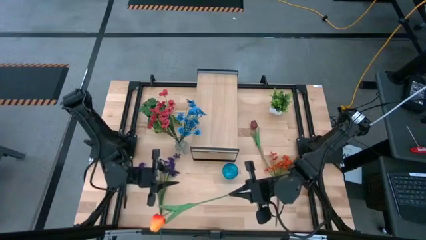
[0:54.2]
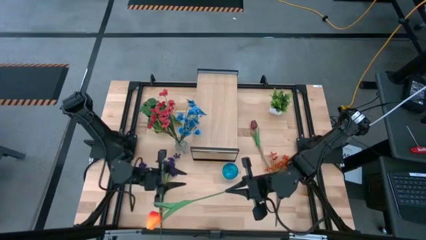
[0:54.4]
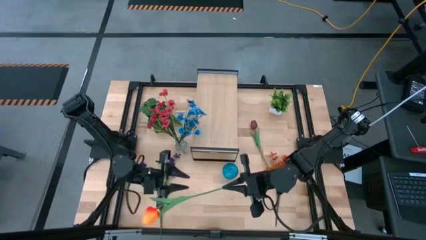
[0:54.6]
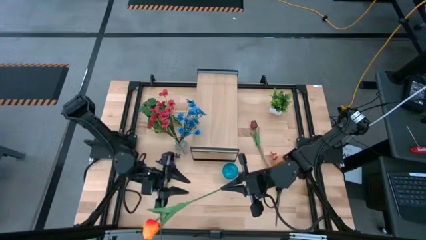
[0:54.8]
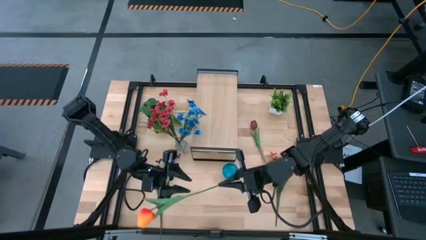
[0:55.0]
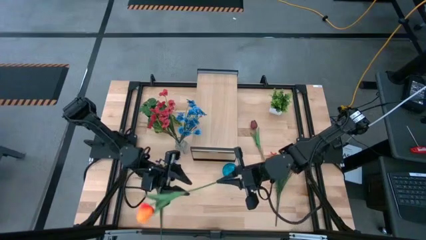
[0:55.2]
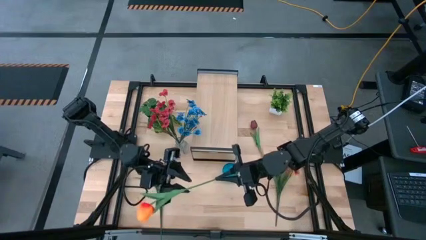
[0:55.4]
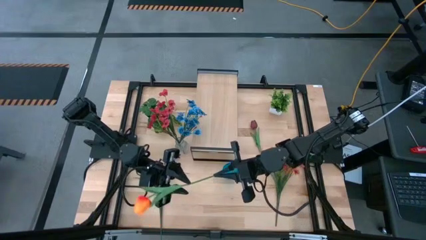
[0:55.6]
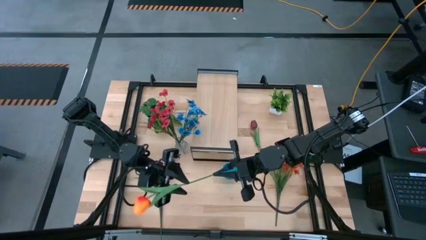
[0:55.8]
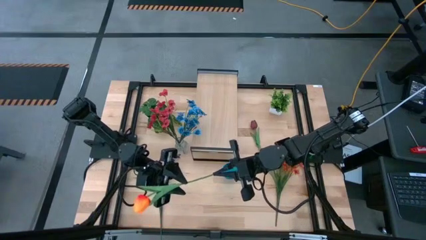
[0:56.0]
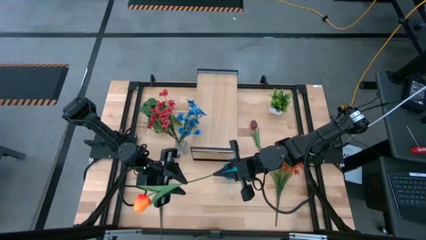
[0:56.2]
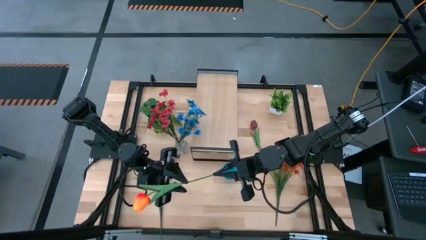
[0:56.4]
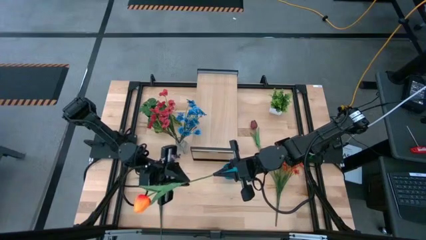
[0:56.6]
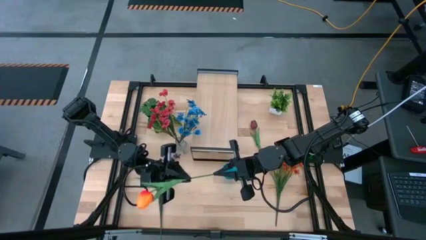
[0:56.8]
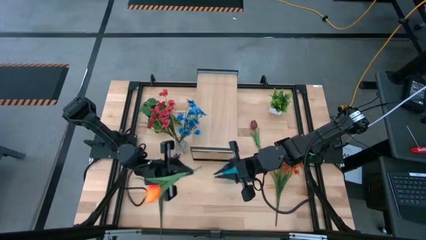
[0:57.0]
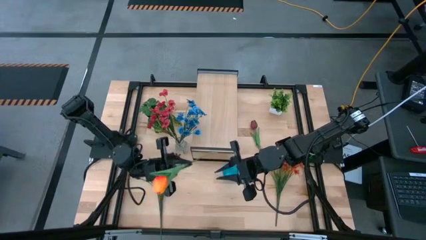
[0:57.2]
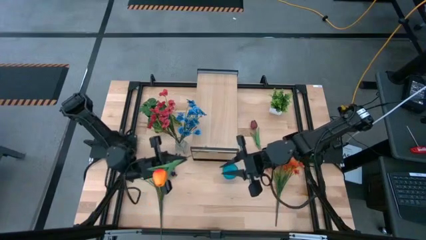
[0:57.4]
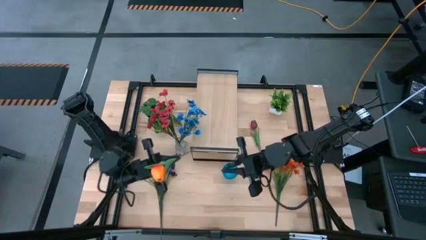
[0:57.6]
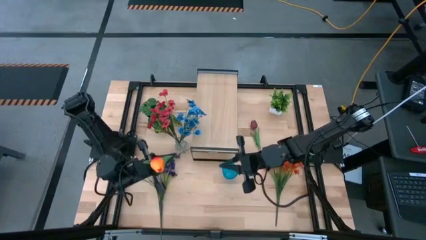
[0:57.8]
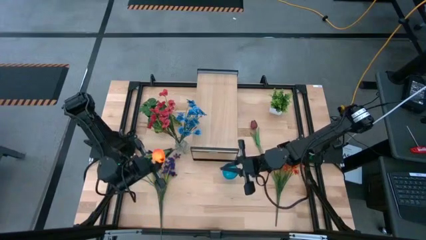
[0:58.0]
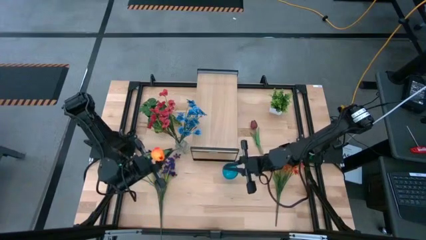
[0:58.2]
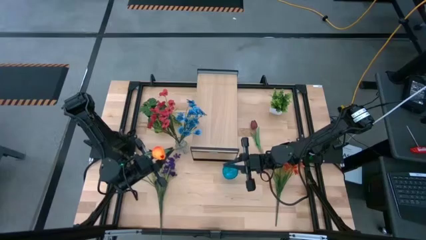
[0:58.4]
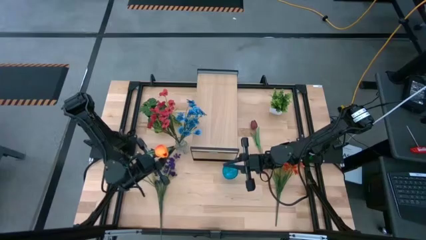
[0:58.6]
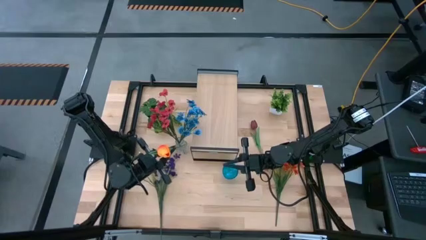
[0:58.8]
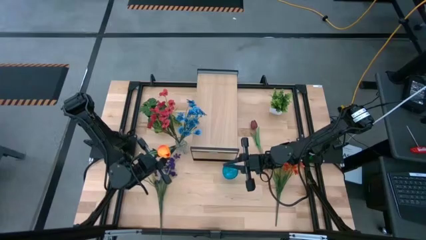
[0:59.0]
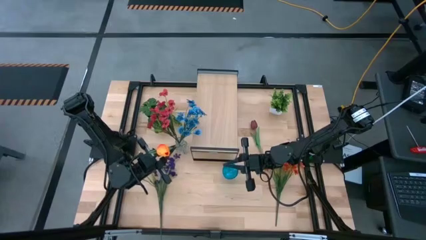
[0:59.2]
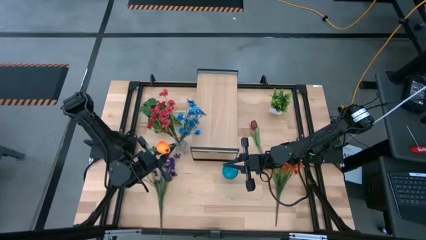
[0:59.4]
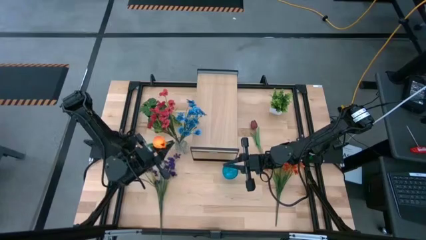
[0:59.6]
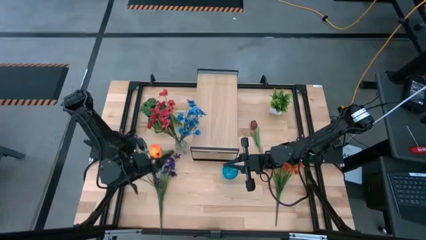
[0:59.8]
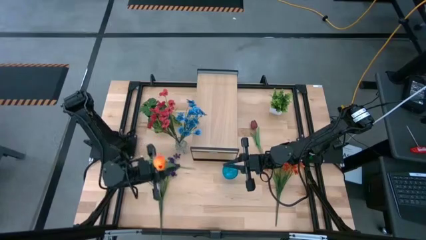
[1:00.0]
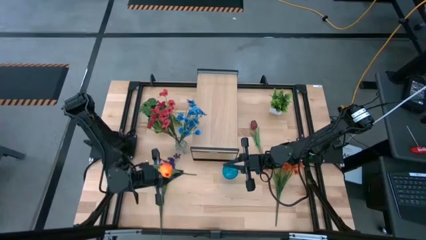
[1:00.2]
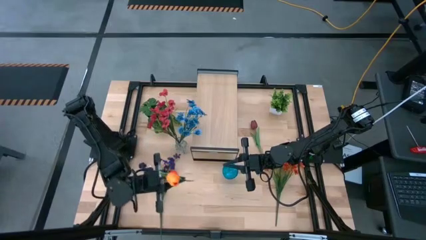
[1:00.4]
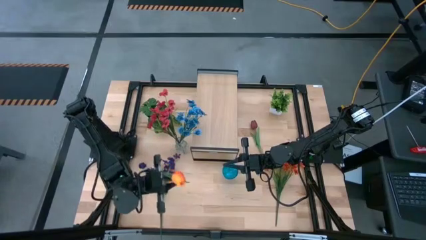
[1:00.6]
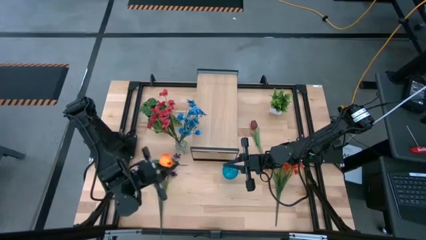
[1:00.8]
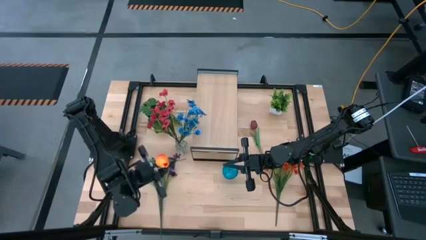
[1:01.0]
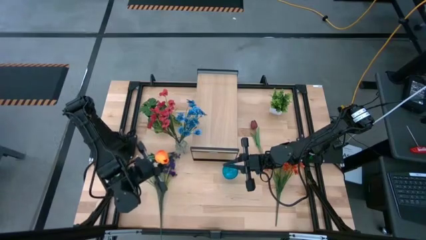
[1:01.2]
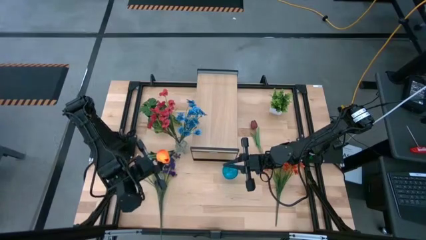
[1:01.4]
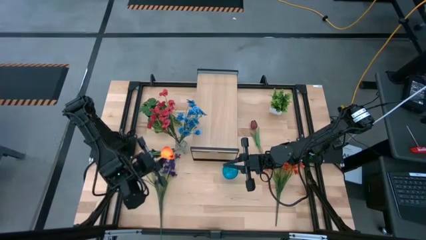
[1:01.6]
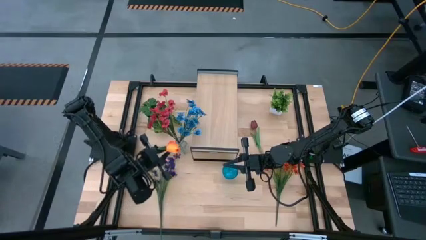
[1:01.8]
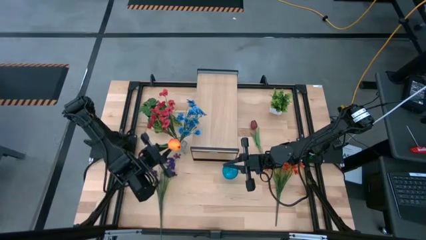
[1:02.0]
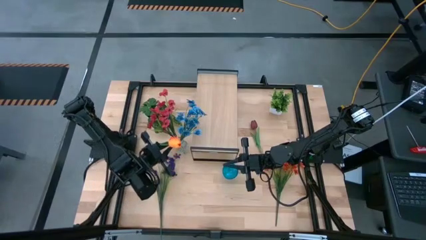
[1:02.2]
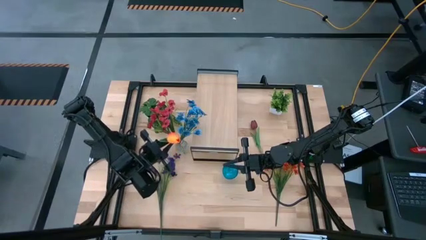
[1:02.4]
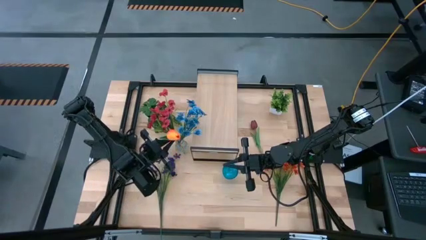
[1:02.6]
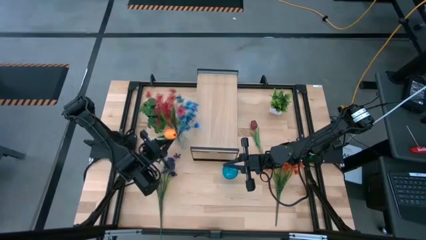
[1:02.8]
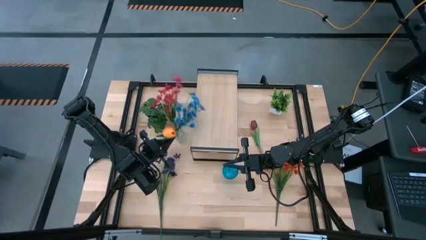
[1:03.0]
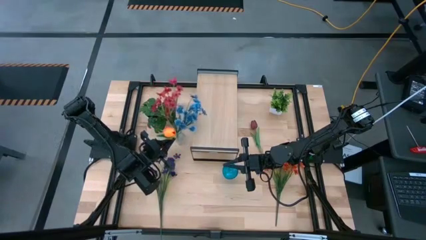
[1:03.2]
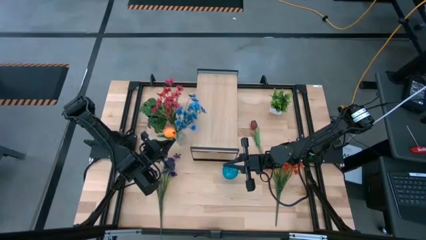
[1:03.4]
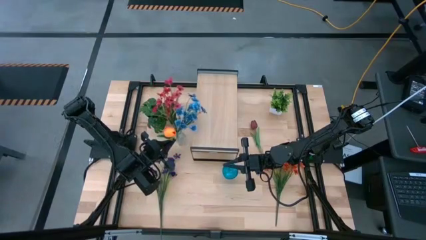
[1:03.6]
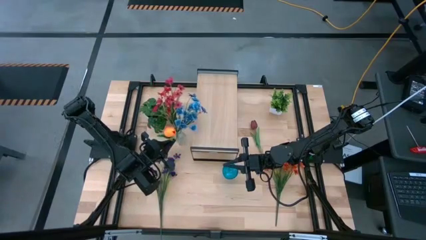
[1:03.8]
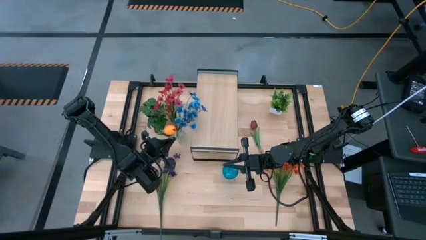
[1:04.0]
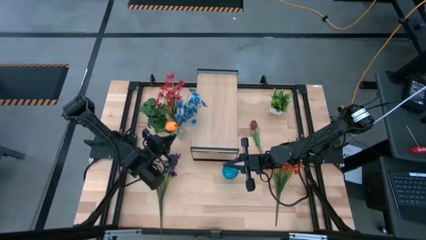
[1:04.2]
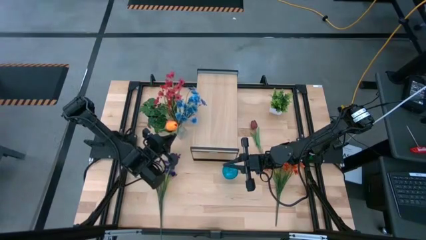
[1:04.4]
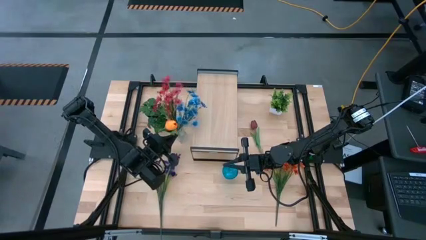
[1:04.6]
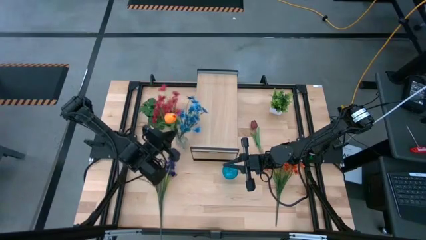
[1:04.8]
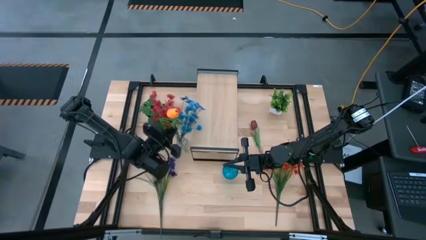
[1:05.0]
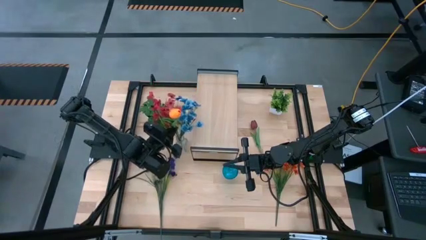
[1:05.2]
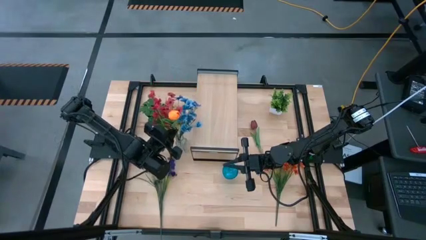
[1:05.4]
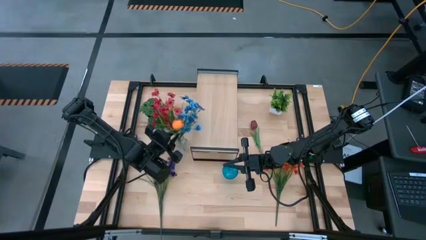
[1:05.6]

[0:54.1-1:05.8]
Task: Pick and place flowers into a vace then onto a shelf
Put the orange tulip into the transparent vase

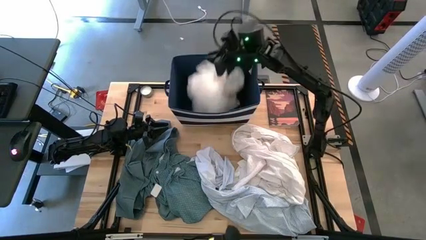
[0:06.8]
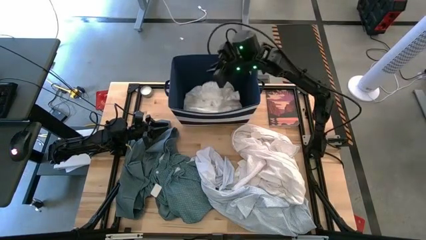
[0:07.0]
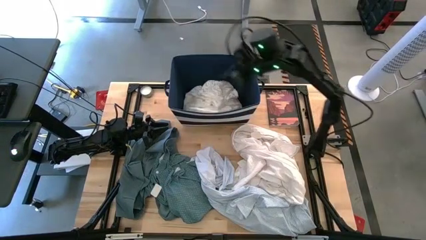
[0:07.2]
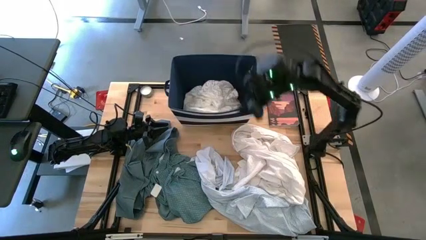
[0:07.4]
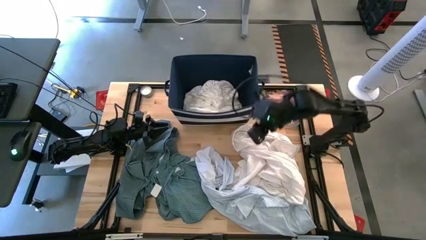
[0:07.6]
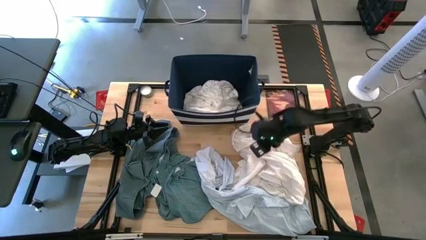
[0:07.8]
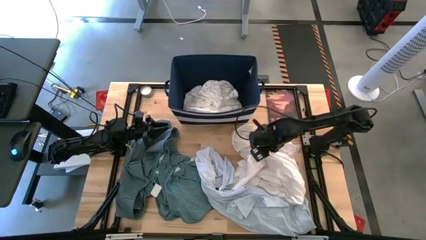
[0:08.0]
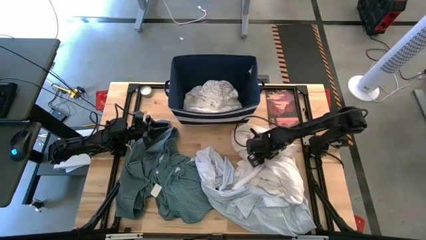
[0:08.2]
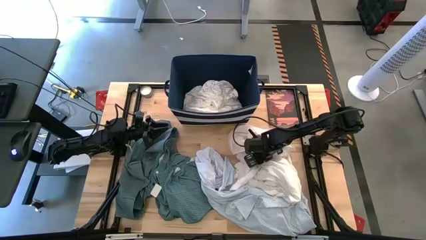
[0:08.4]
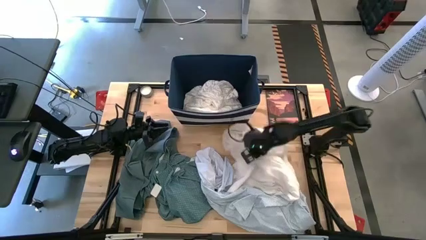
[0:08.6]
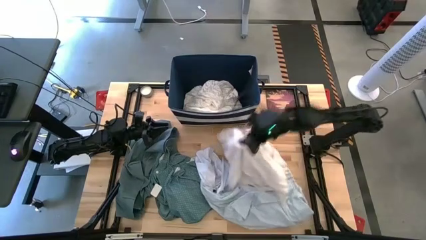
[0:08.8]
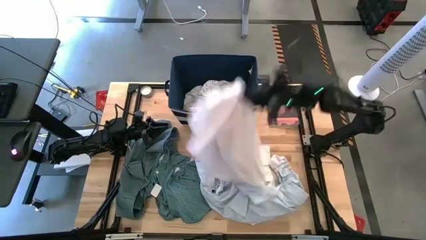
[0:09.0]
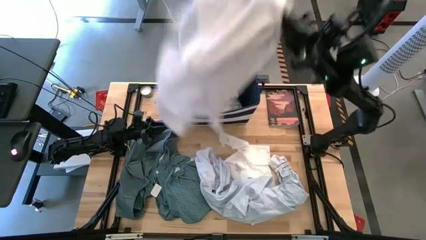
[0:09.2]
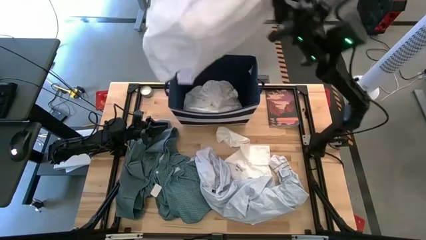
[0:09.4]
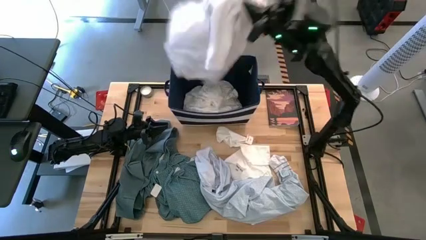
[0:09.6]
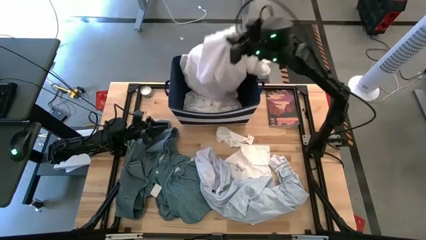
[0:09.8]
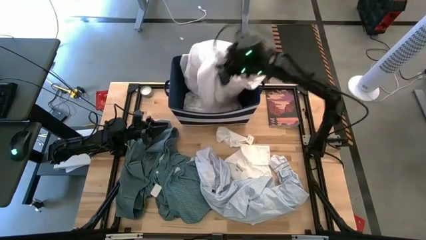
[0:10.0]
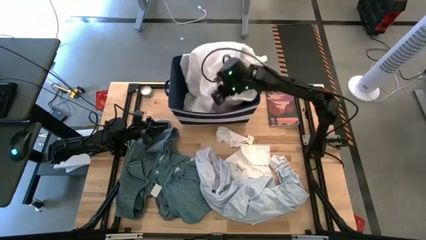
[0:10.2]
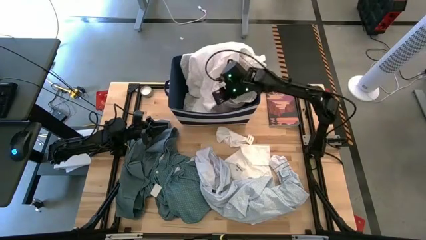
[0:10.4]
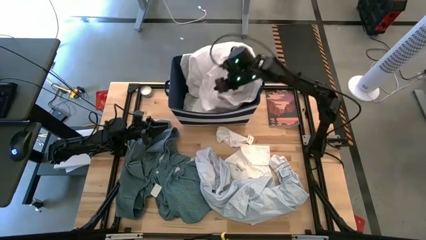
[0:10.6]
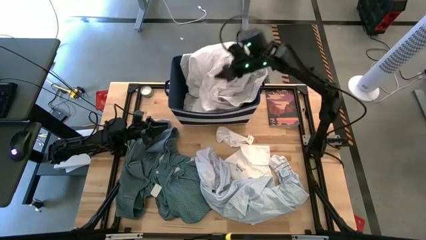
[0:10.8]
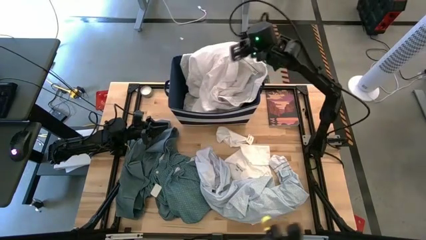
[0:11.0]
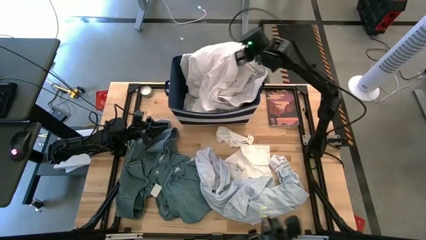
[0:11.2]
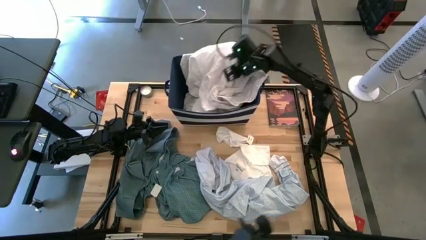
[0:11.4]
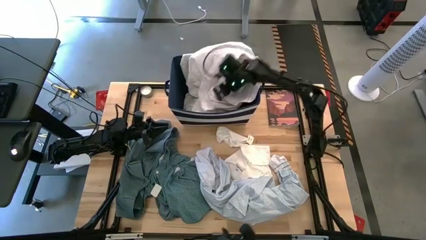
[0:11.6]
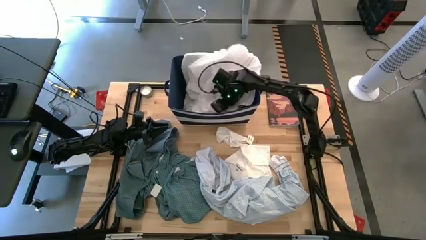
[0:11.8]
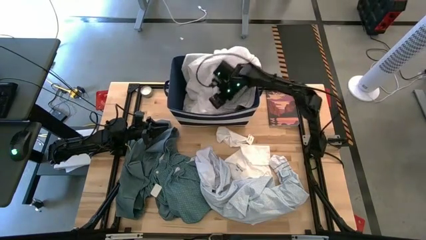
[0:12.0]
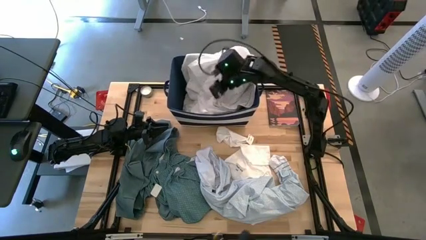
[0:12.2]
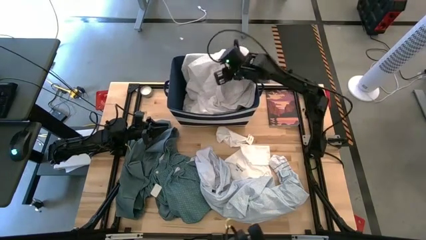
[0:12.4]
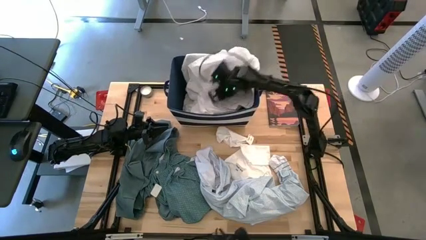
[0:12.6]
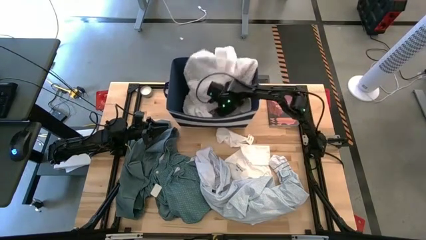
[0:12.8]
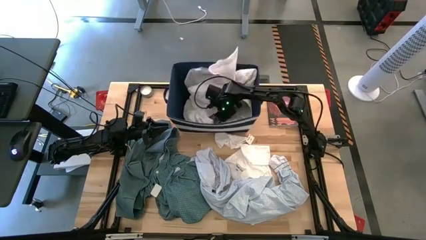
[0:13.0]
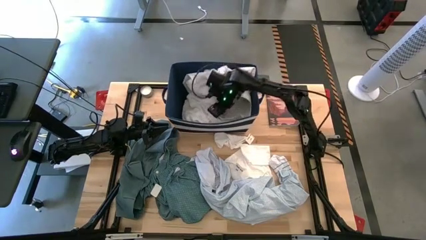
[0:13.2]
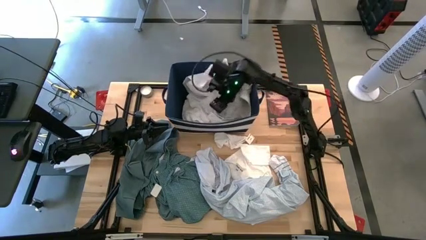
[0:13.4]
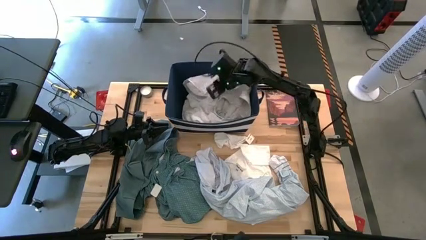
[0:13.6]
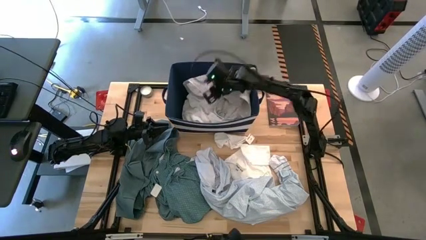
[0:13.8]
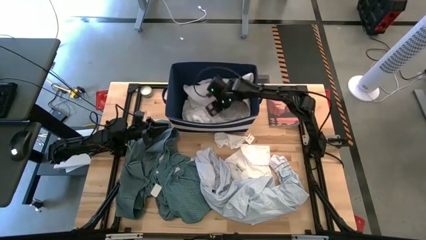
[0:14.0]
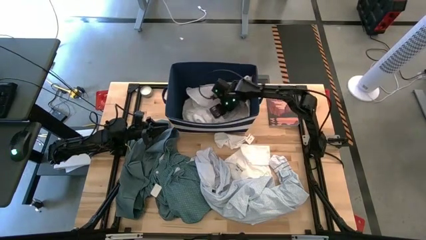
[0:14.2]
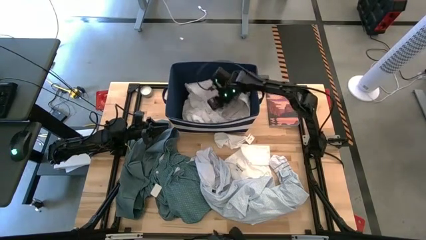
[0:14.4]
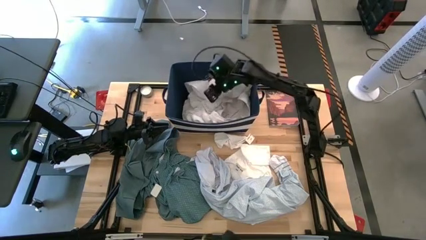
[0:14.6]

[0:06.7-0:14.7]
Task: Sort clothes
Put the white polo shirt into the blue bin
